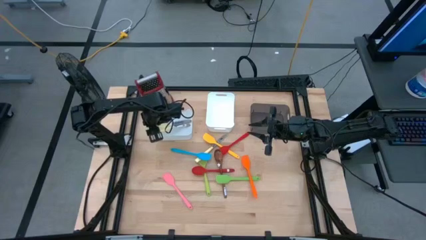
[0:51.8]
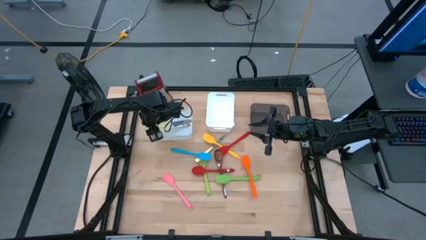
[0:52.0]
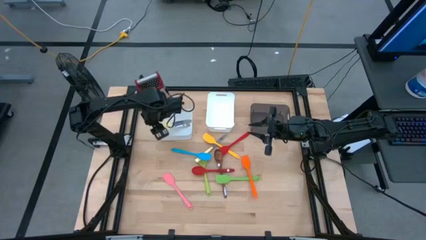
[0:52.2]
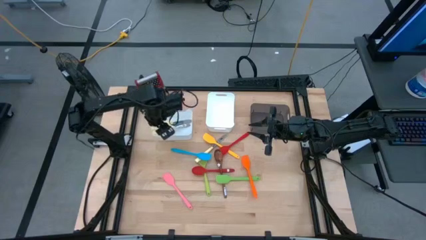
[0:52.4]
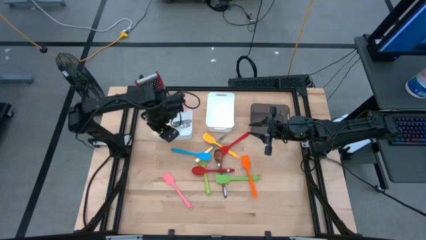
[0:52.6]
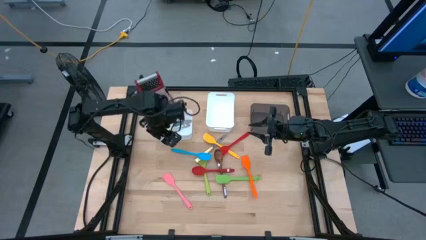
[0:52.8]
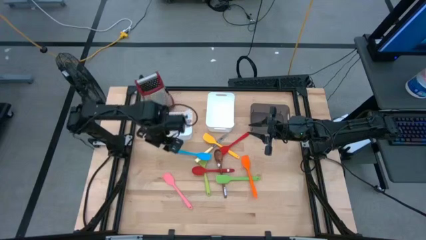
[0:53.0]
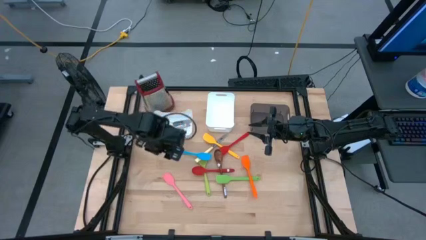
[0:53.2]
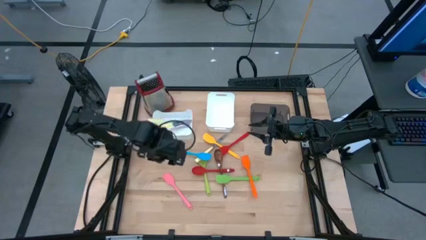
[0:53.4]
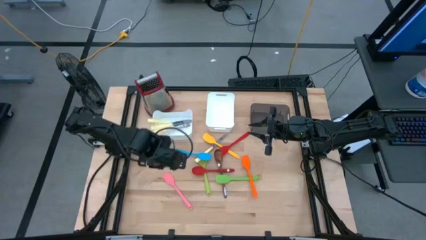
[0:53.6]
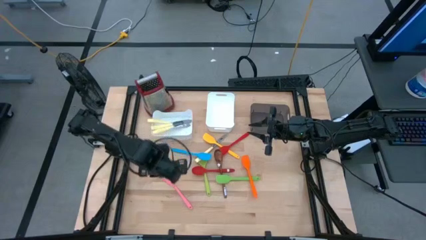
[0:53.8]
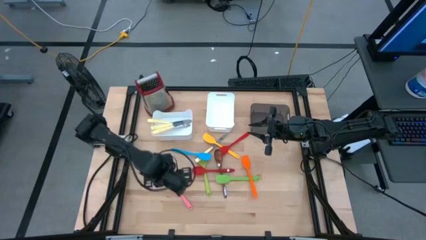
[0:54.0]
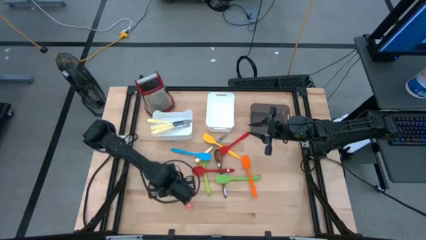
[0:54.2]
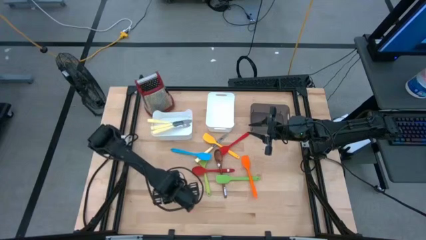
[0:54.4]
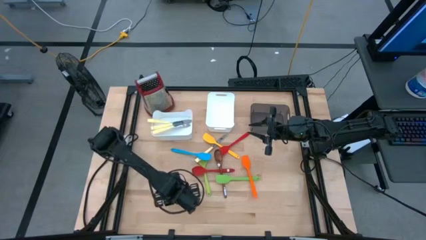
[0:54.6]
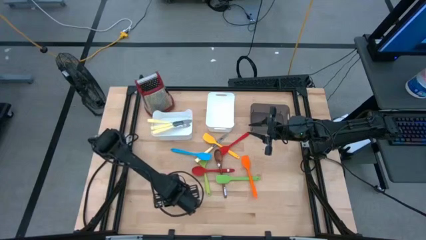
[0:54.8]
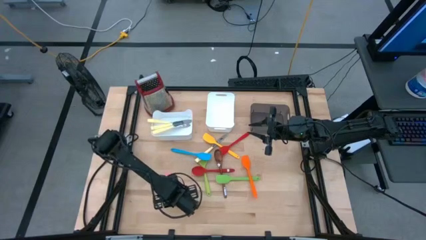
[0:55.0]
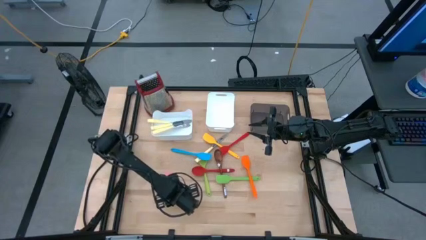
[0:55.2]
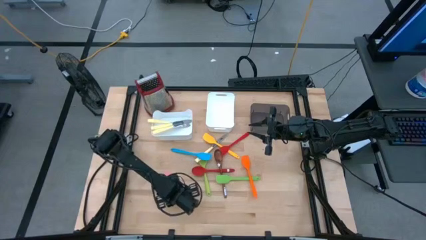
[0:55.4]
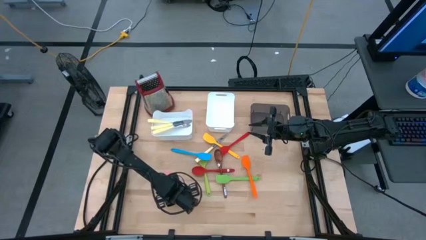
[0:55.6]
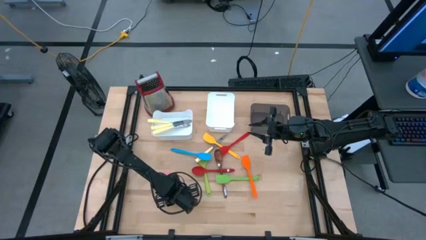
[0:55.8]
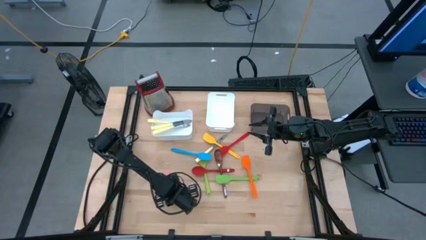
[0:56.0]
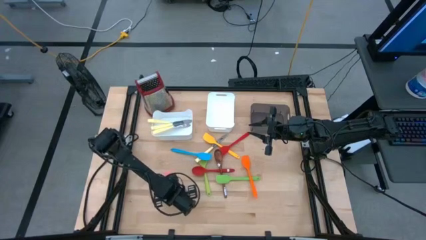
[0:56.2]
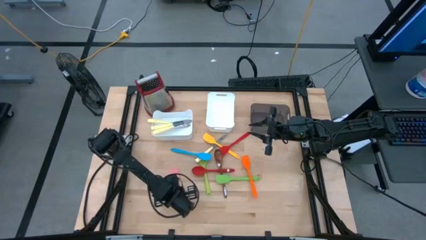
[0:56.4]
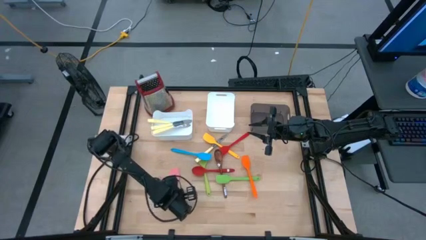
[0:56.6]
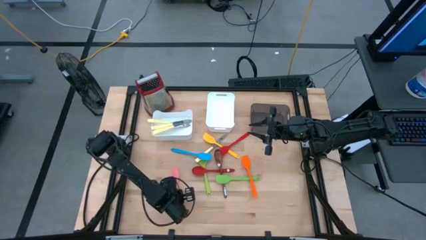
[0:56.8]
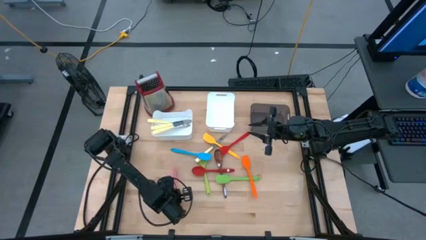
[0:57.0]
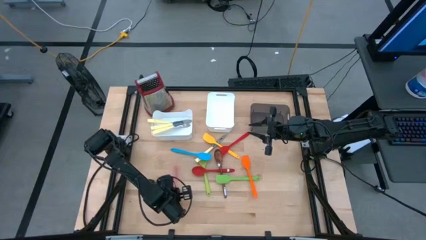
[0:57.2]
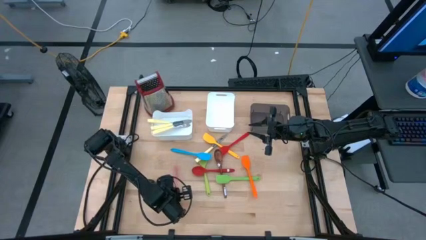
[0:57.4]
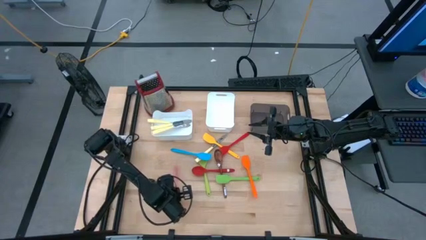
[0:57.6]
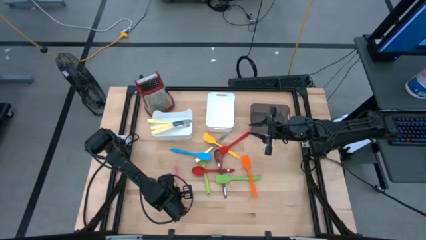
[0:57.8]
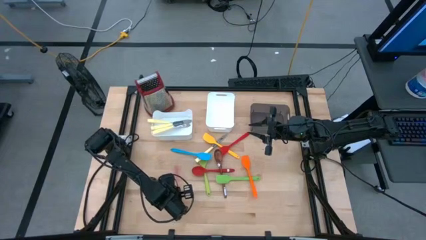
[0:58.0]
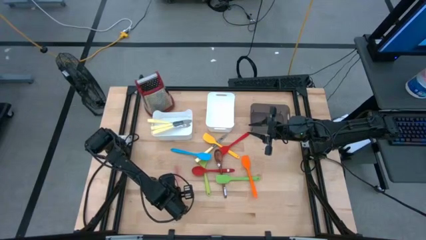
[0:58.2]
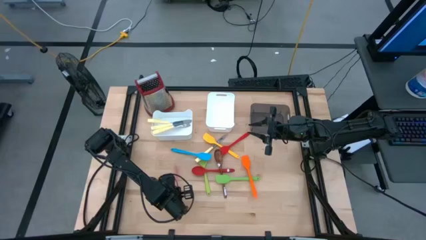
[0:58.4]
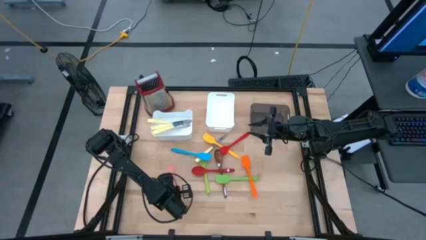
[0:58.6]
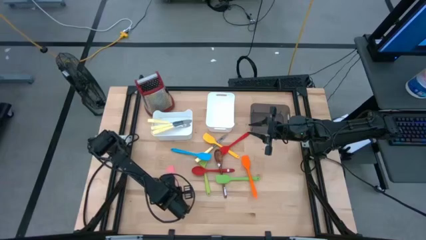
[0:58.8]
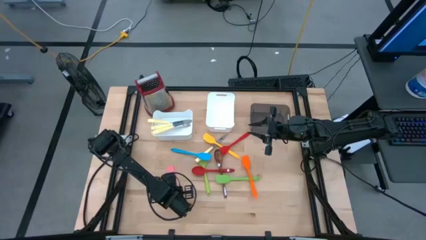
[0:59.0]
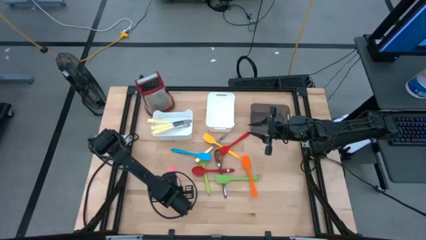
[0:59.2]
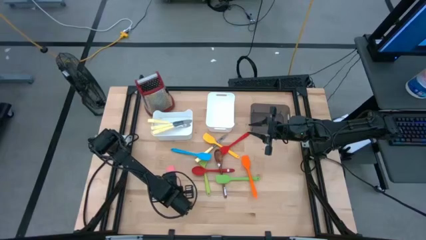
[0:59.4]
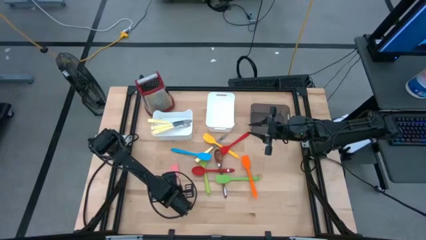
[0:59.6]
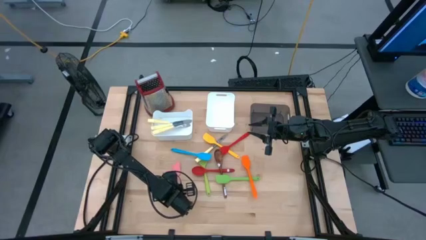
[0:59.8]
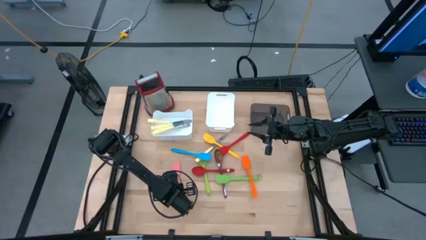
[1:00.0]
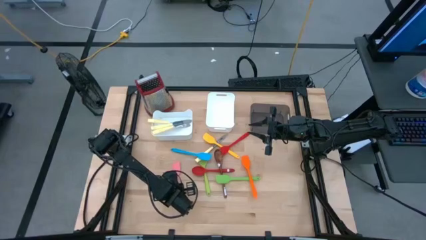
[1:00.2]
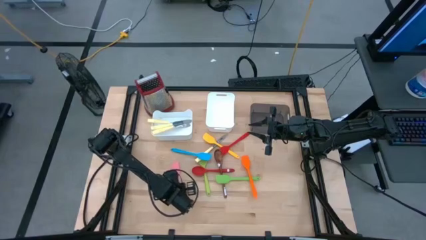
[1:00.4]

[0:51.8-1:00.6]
Task: Pick & Place Kitchen Items
Put the pink spatula into the black bin
